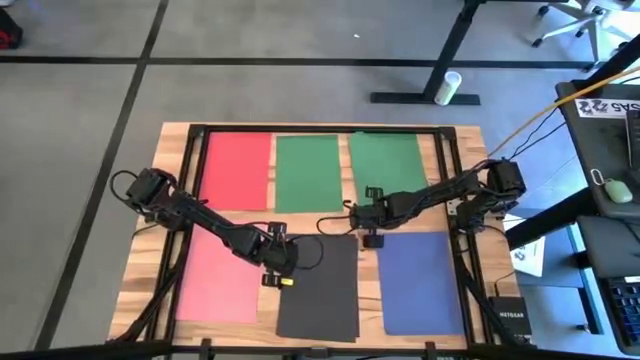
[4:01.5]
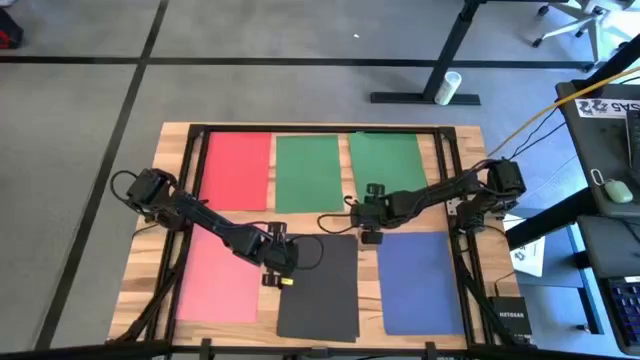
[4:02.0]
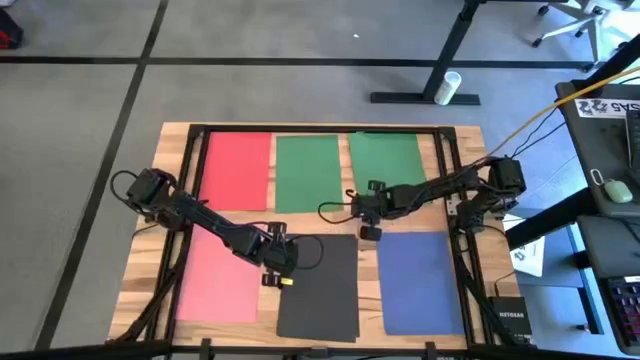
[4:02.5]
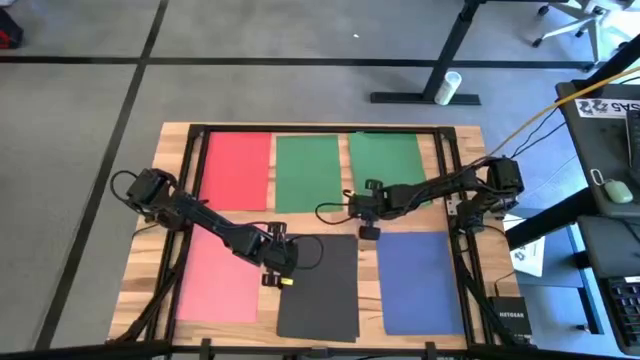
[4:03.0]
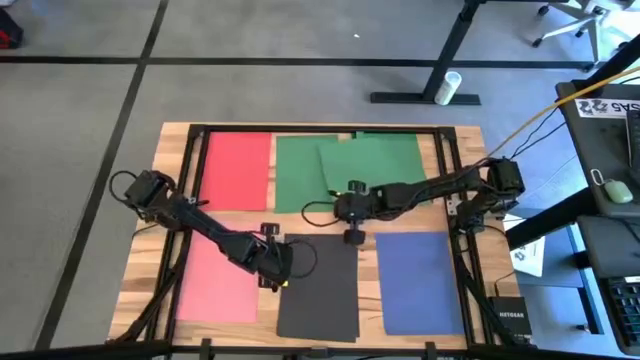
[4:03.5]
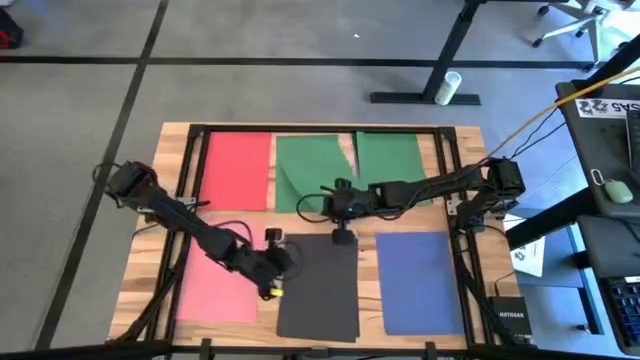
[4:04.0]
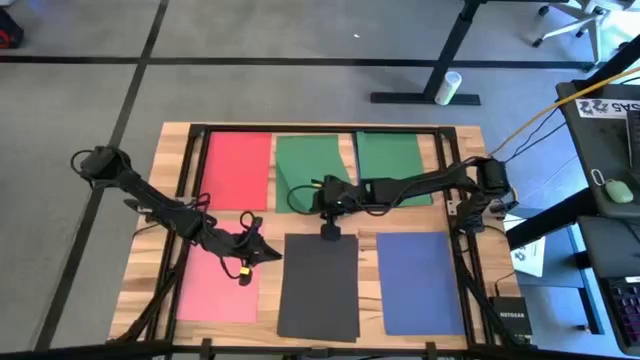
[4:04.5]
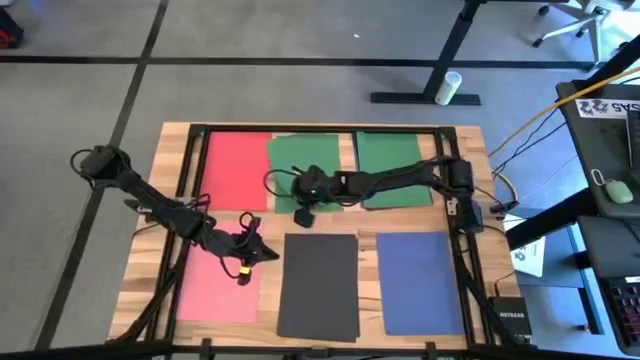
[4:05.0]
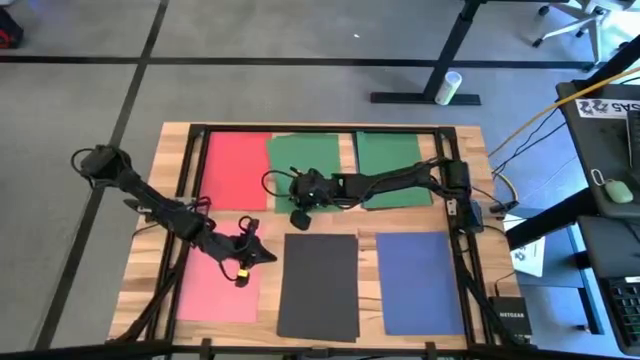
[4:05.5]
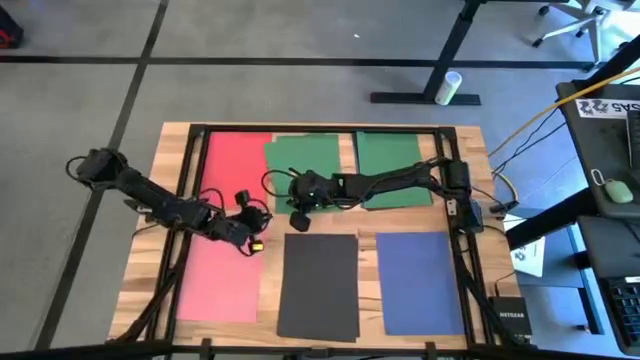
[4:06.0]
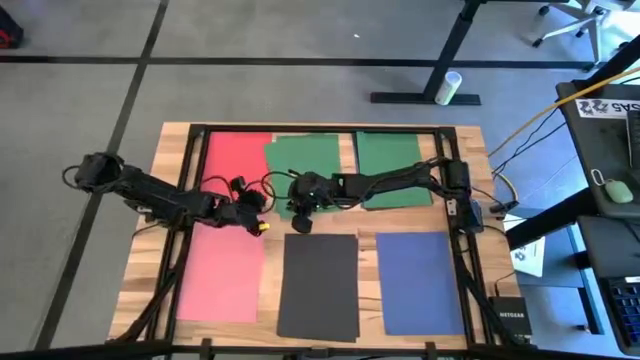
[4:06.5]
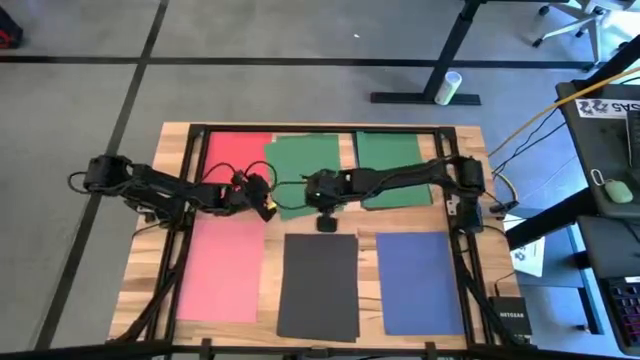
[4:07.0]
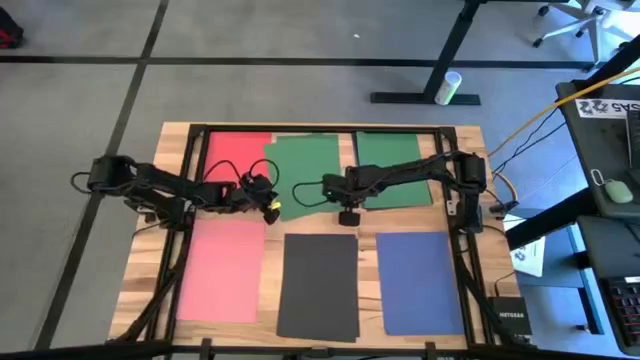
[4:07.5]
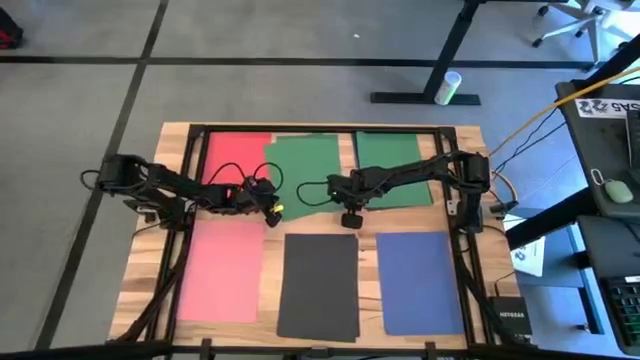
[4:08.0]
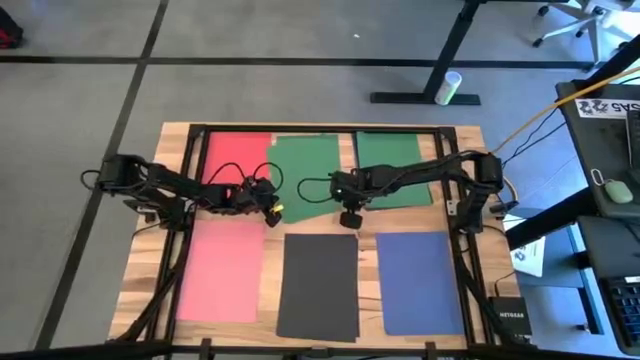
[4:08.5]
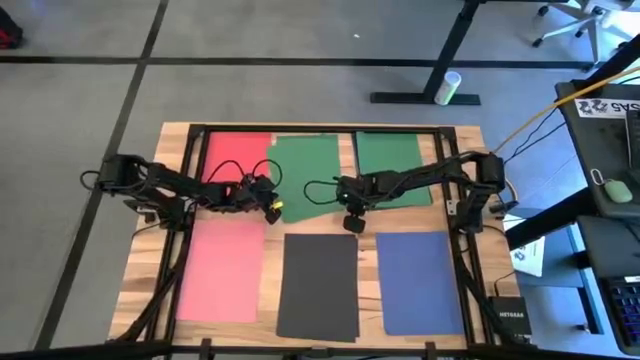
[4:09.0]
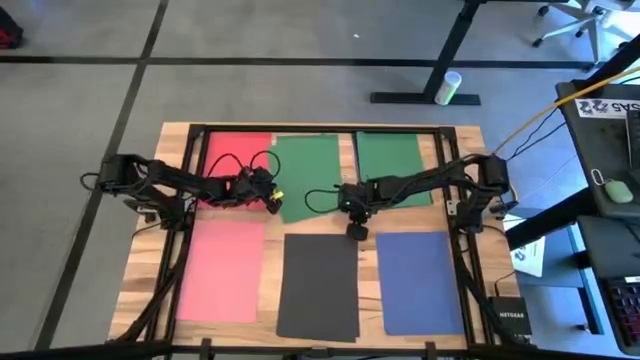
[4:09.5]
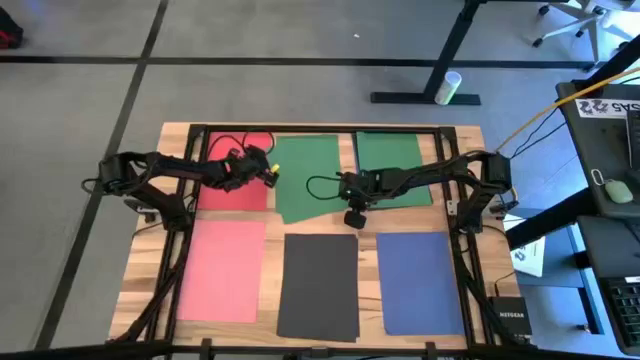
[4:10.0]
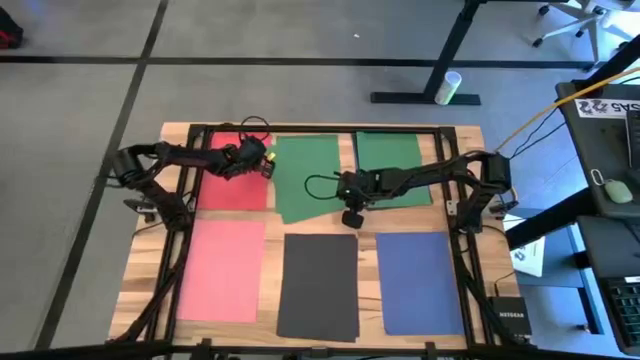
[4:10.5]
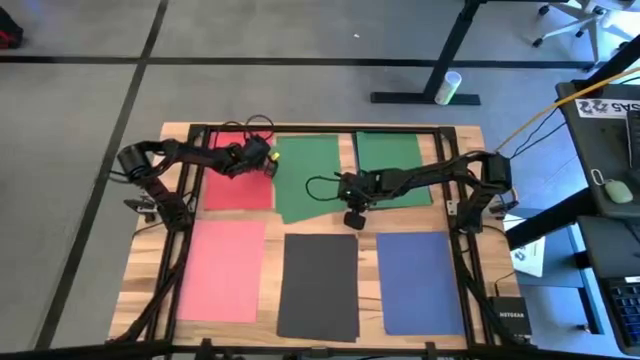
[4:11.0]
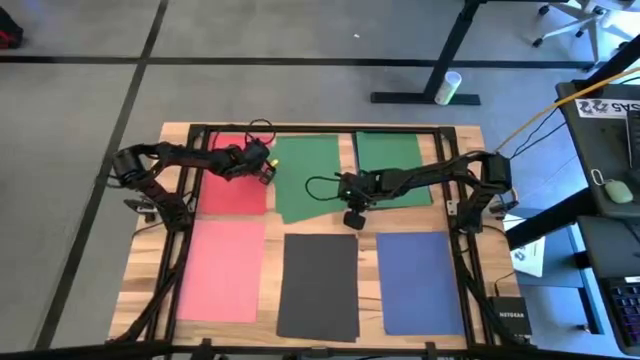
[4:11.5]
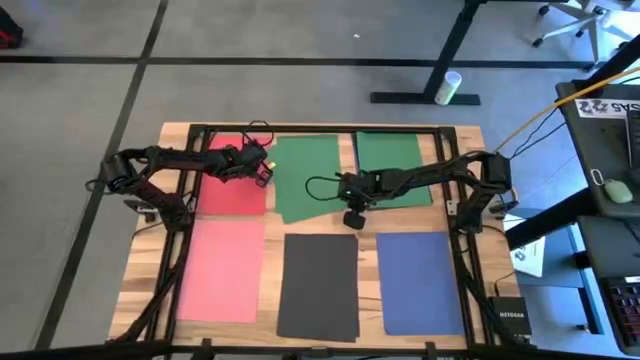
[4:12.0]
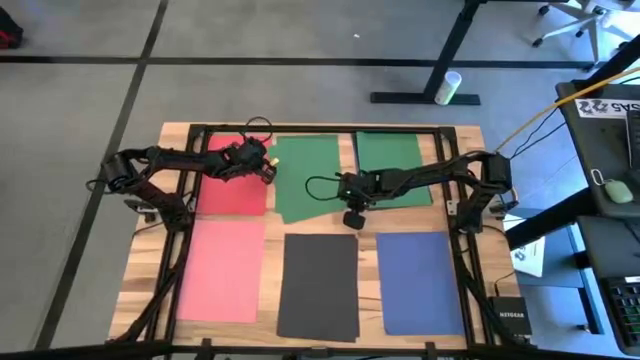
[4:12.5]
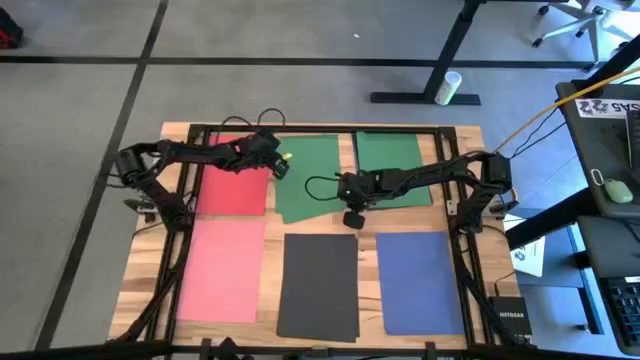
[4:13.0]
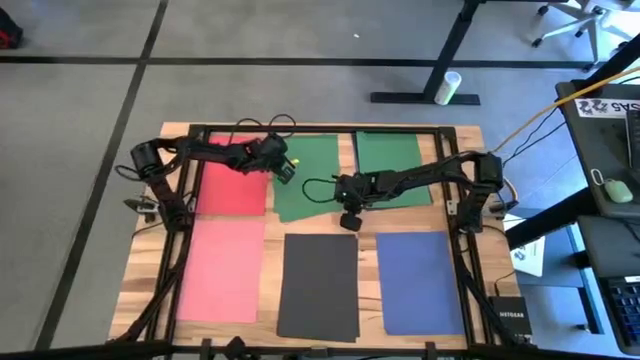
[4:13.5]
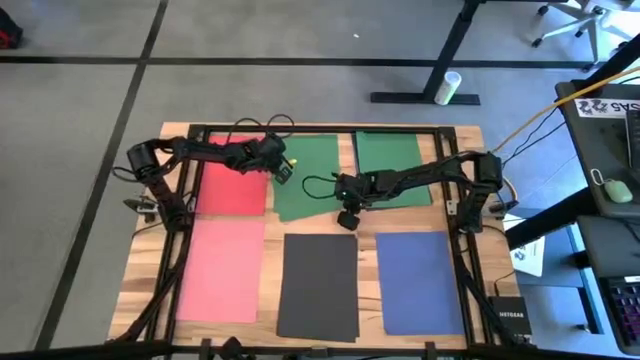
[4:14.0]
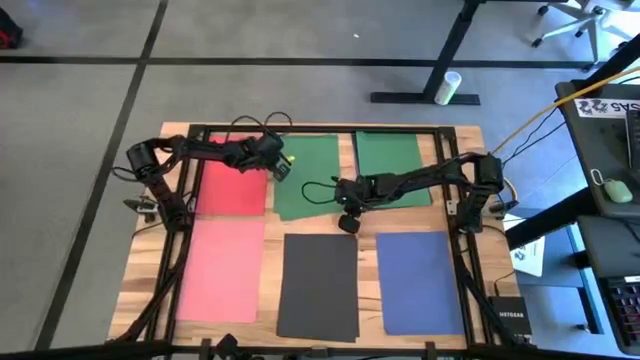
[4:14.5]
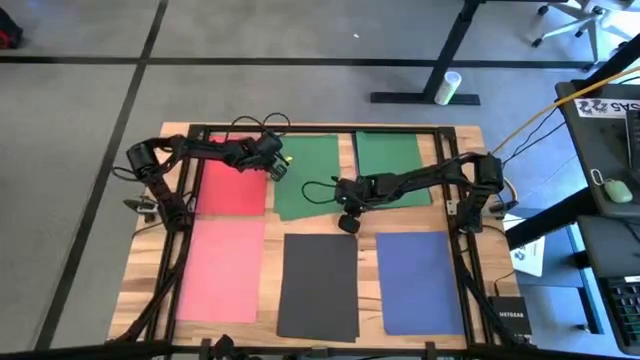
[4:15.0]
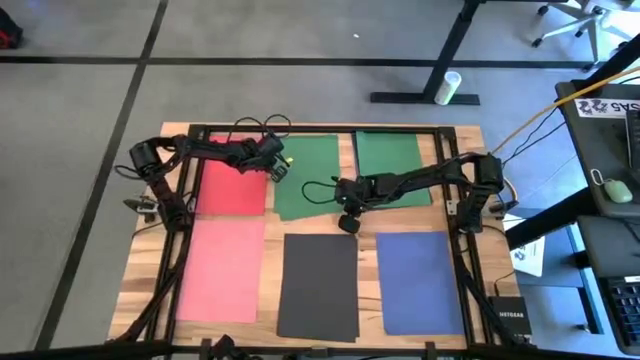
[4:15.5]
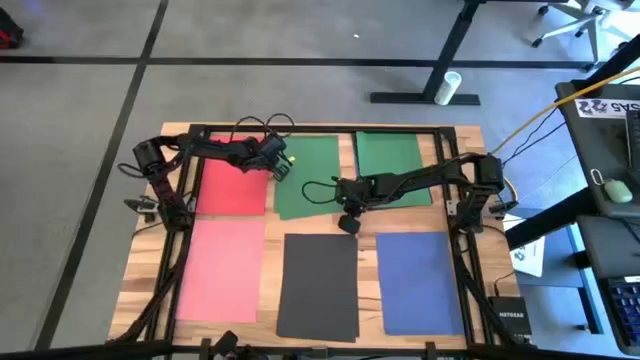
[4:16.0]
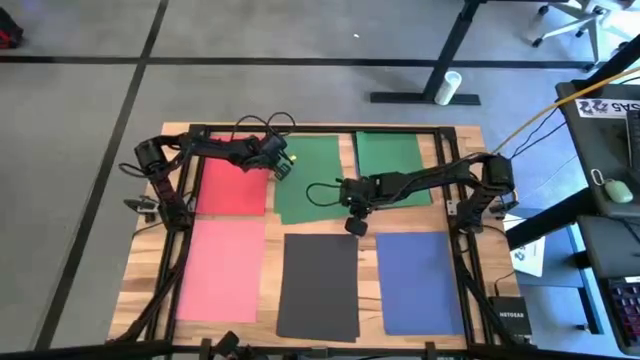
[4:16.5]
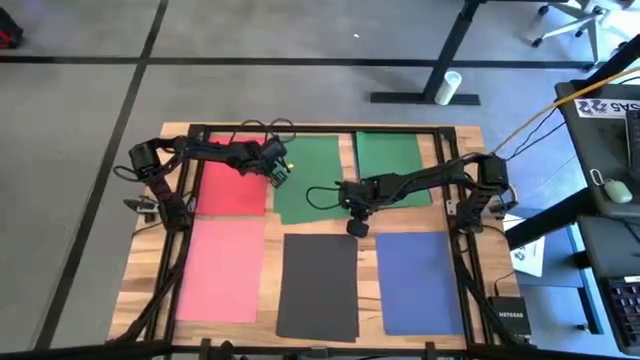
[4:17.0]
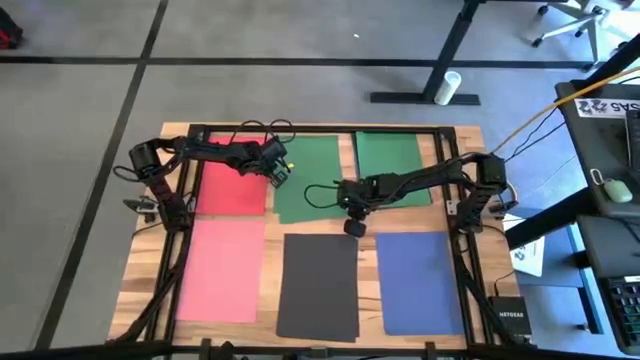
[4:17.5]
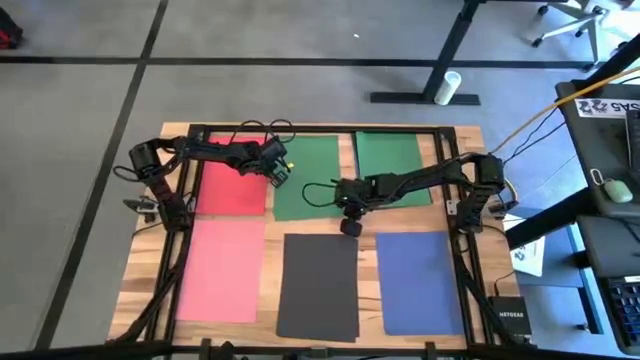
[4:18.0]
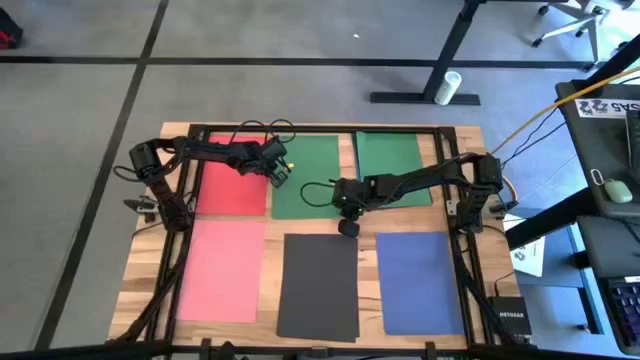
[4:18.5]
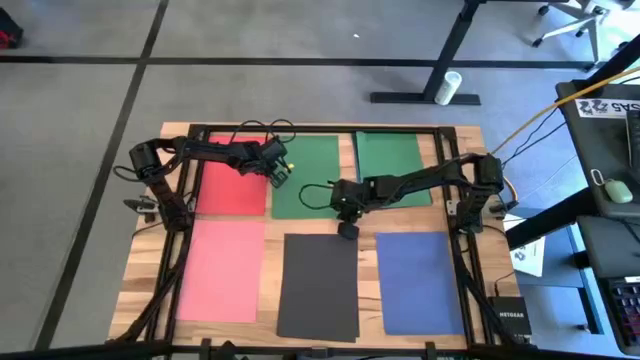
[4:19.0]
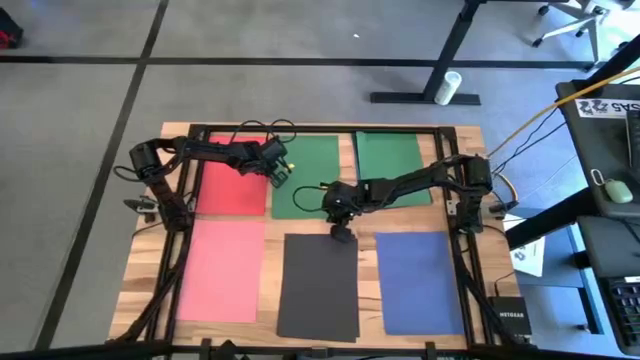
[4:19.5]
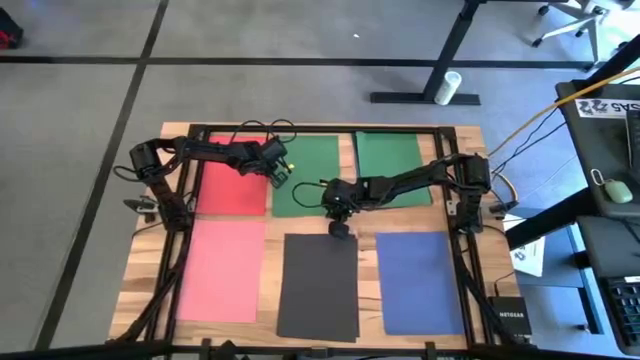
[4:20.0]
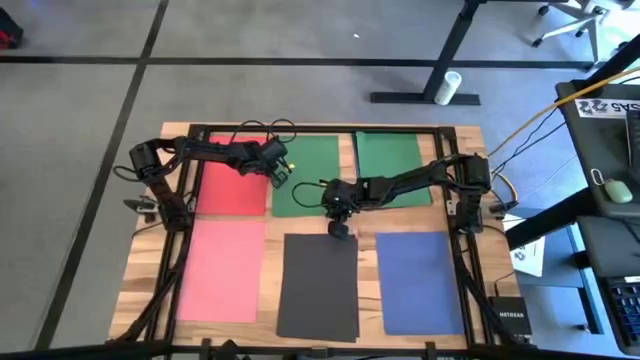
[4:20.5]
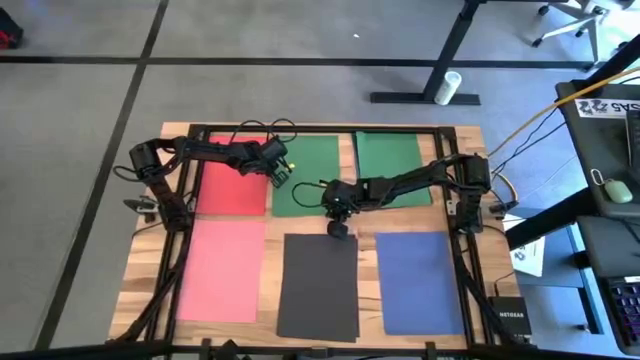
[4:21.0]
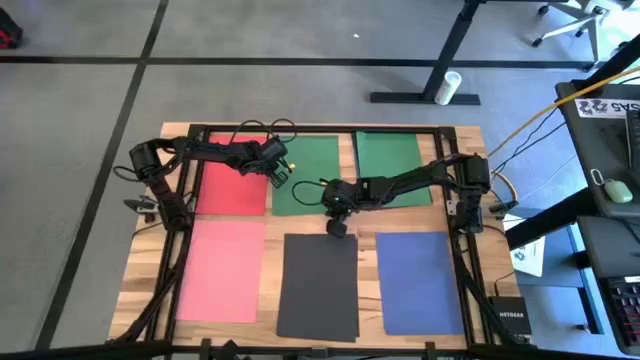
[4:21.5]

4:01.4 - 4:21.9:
Task: Organize paper
Stack the green paper on top of the green paper

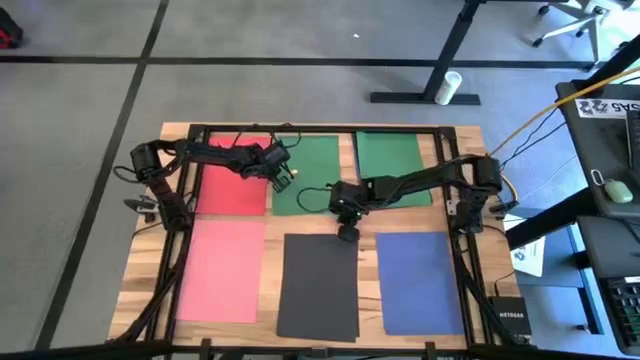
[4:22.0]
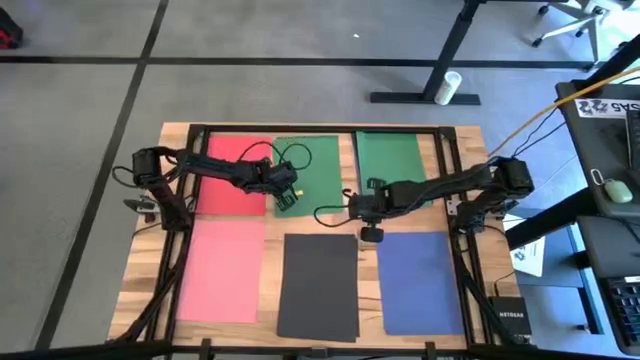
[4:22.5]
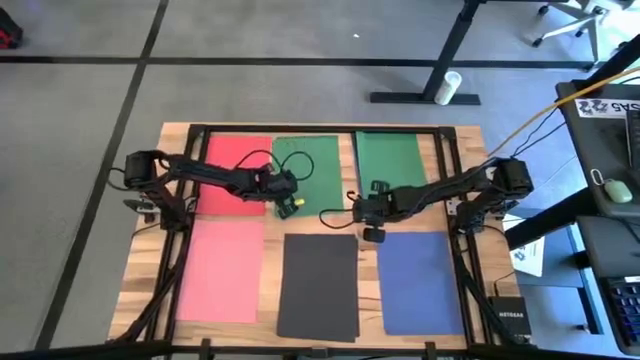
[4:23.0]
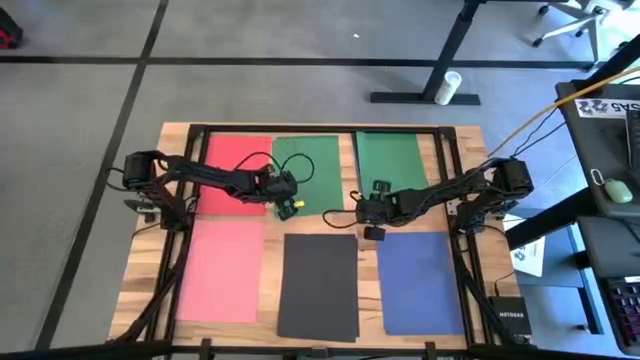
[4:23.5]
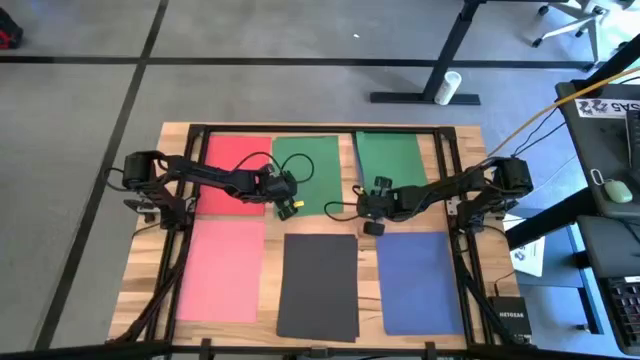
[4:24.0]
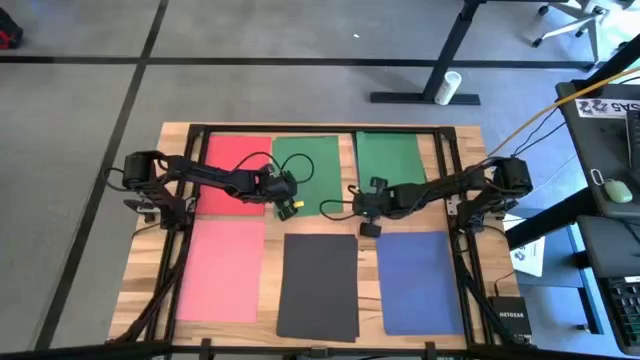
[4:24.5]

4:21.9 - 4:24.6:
Stack the green paper on top of the green papers
